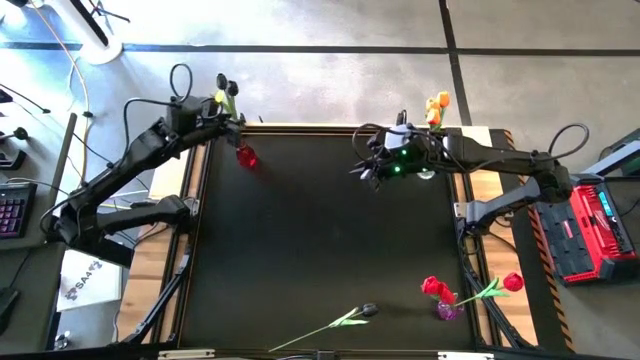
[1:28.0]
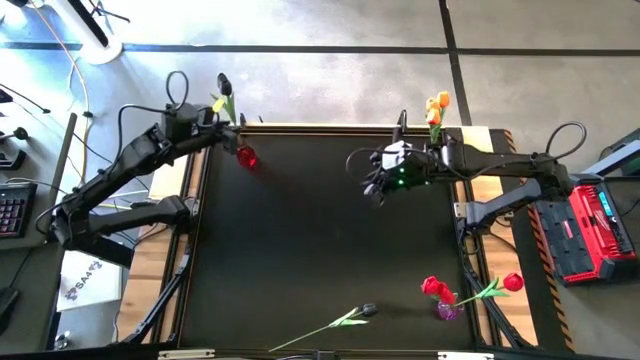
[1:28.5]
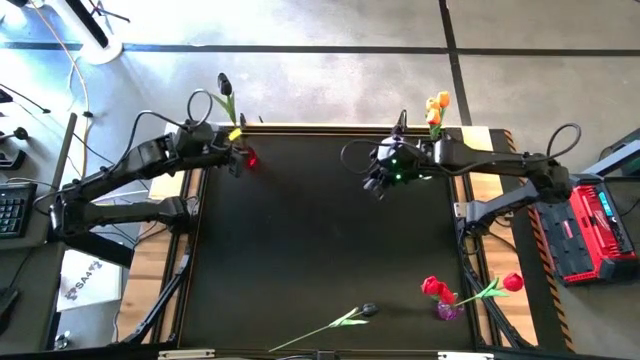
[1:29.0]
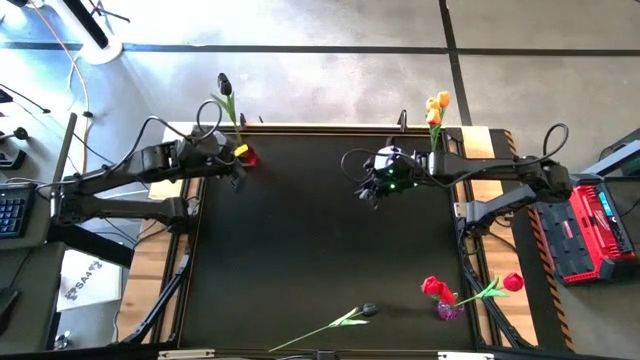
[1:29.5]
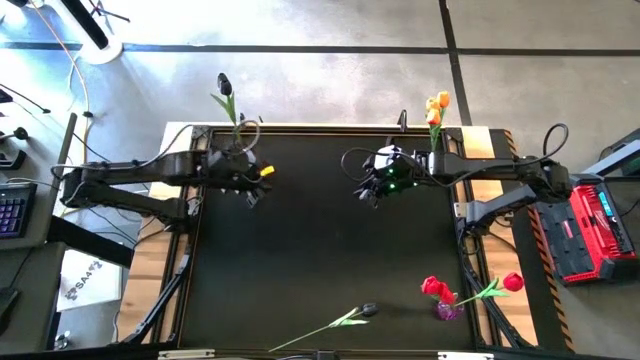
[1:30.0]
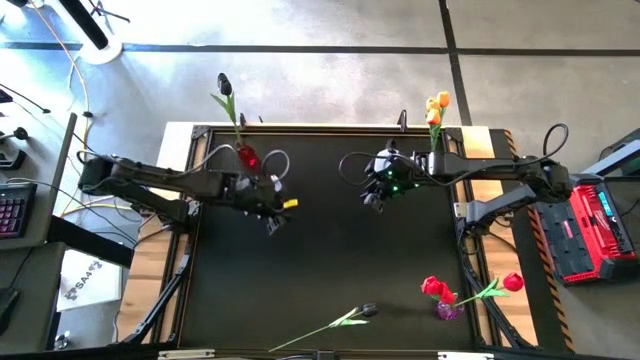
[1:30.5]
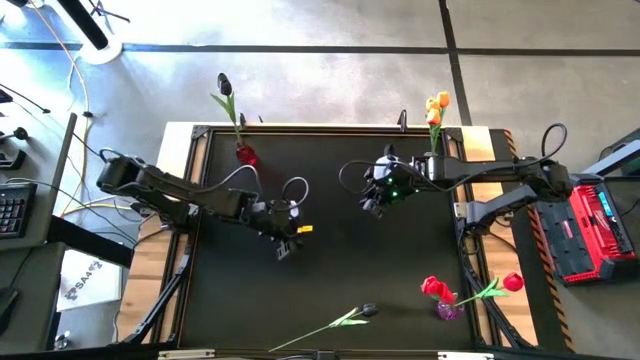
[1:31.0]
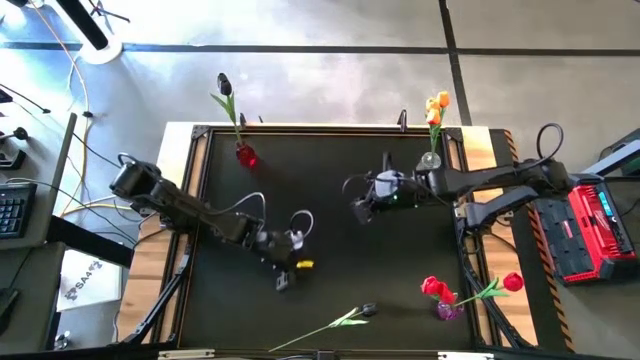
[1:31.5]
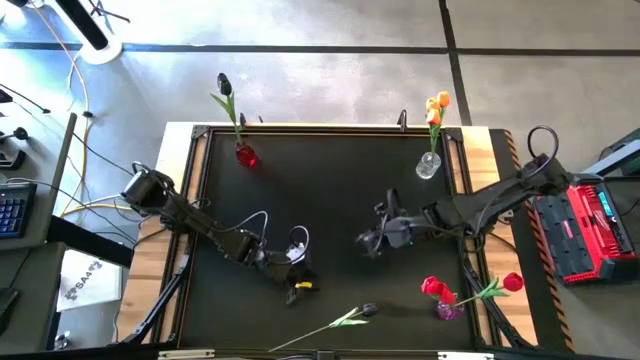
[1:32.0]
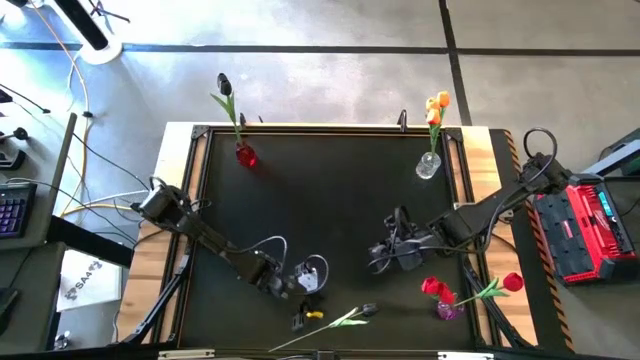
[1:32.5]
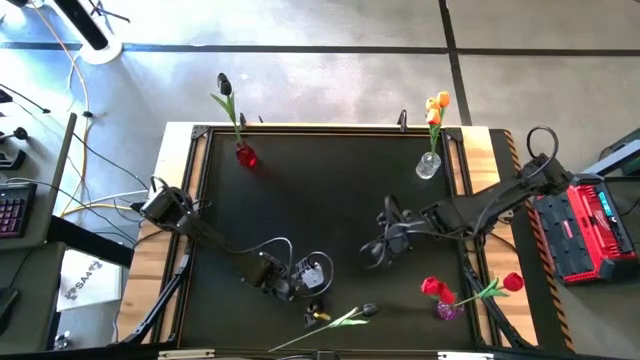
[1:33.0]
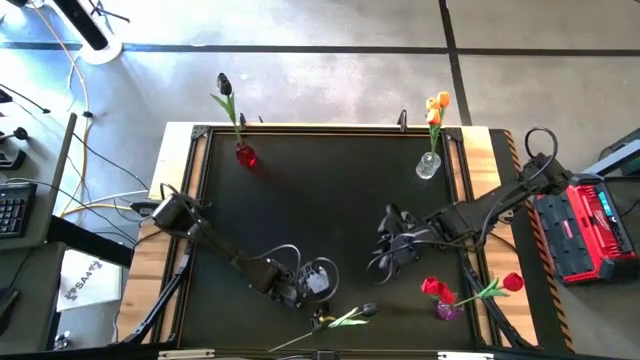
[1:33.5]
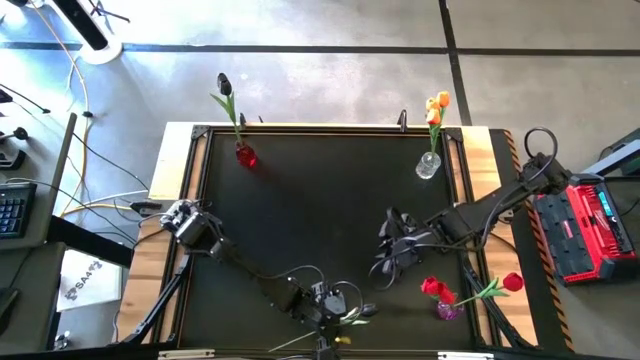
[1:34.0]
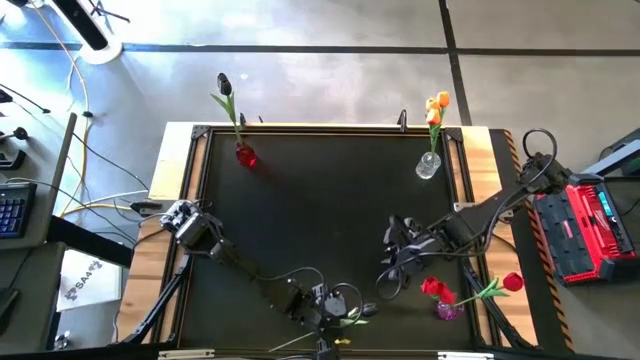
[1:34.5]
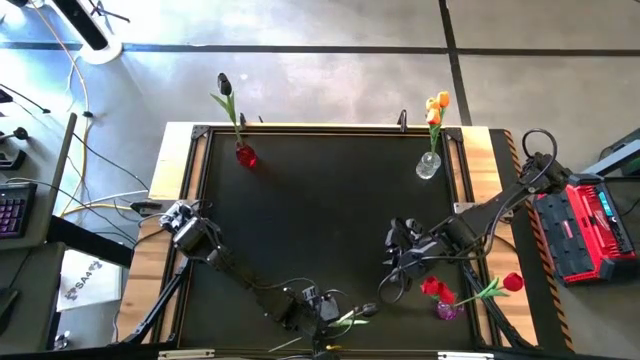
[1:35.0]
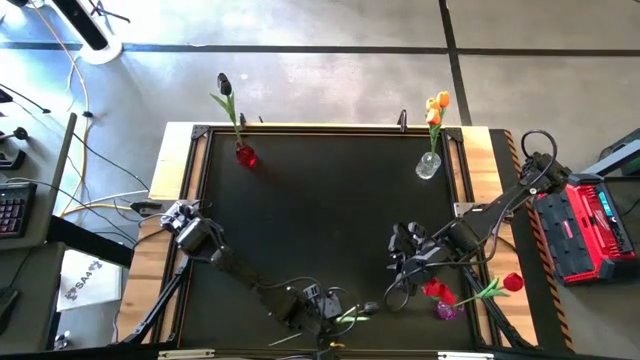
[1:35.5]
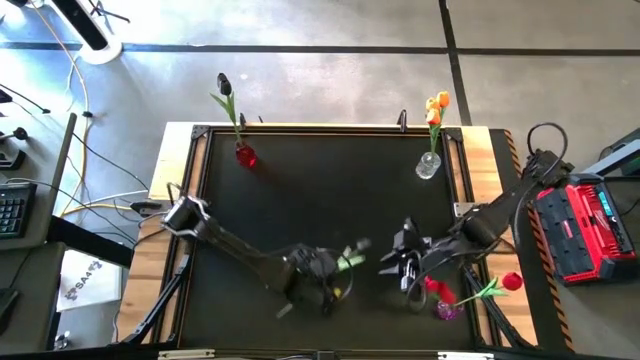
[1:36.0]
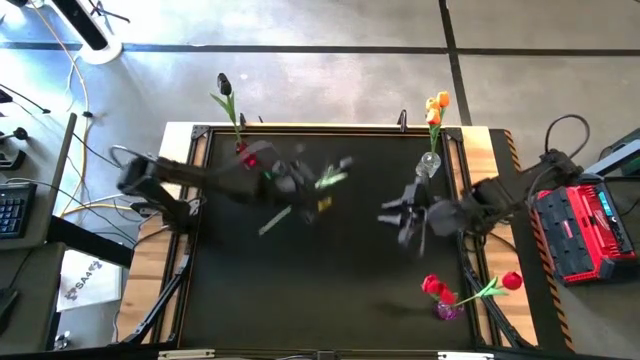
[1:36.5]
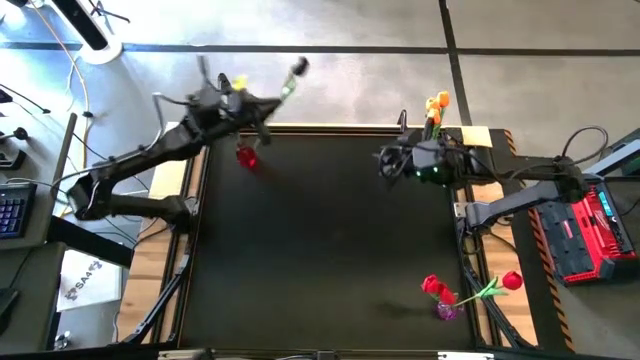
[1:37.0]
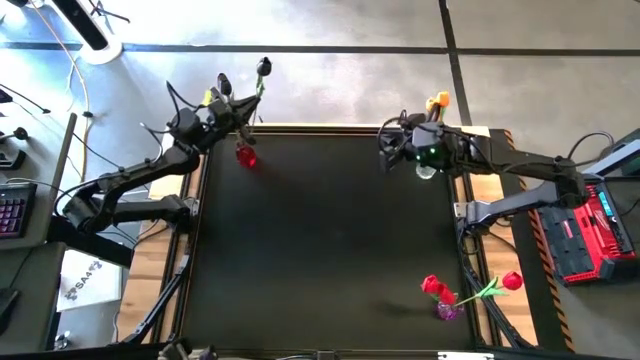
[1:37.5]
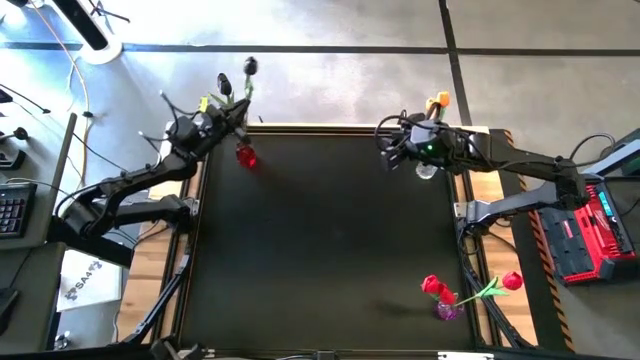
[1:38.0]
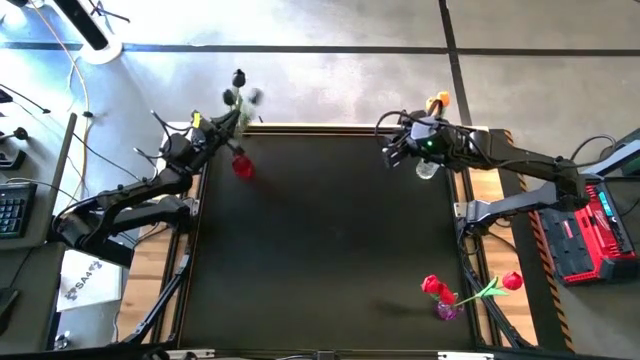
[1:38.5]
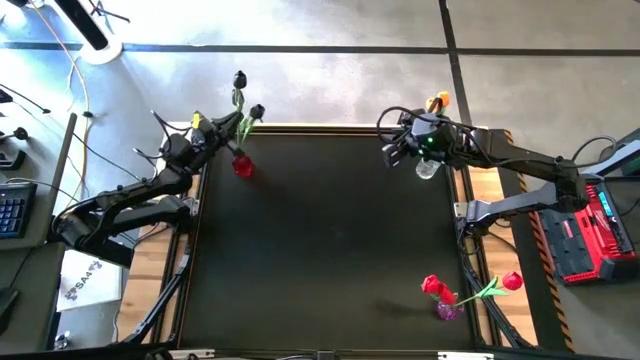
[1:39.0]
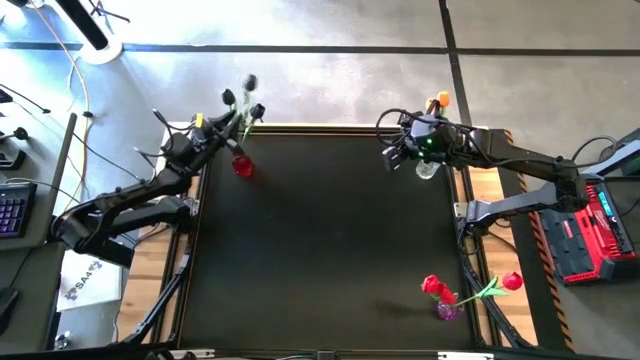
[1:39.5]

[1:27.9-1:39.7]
Task: Sort flowers into vase by color
Put the black tulip into the red vase

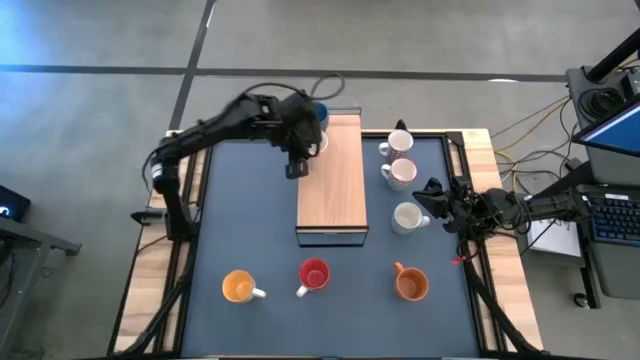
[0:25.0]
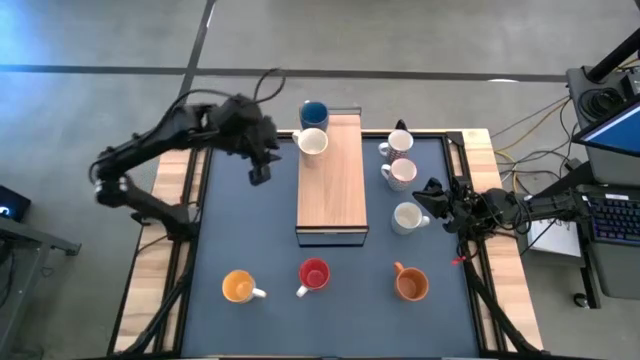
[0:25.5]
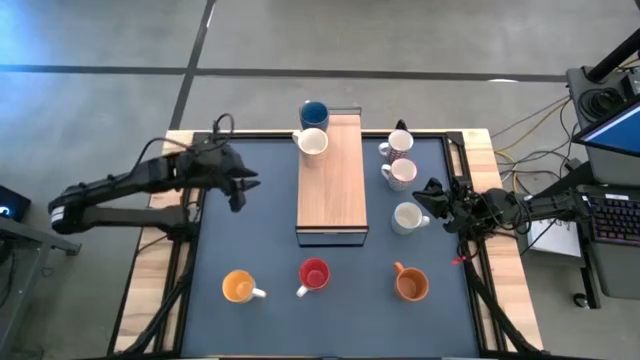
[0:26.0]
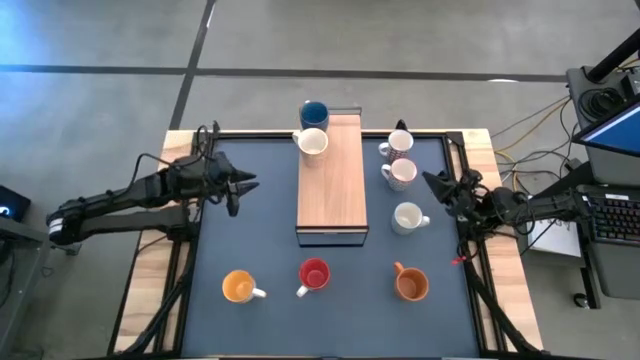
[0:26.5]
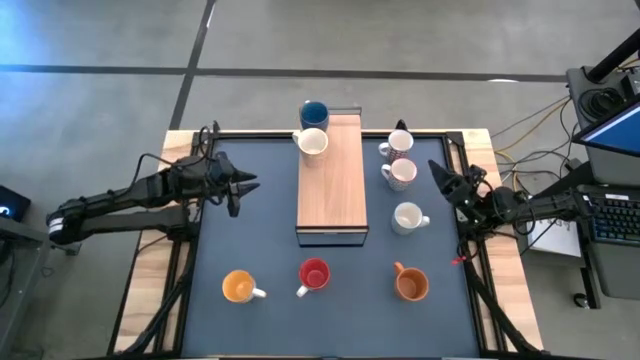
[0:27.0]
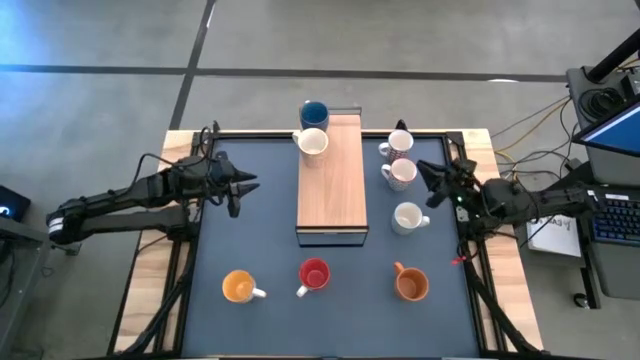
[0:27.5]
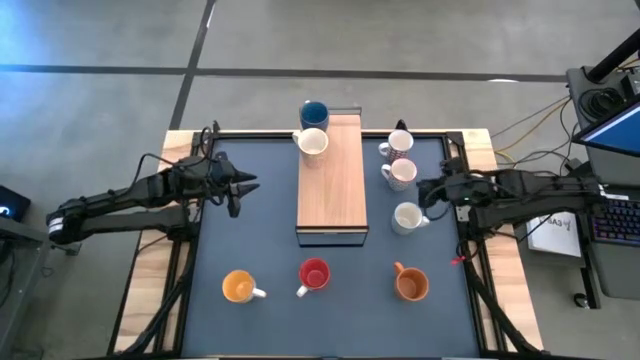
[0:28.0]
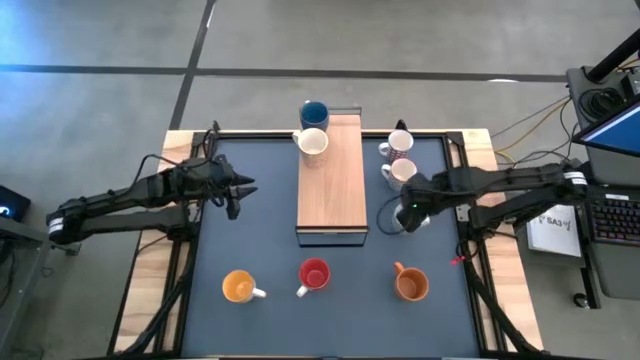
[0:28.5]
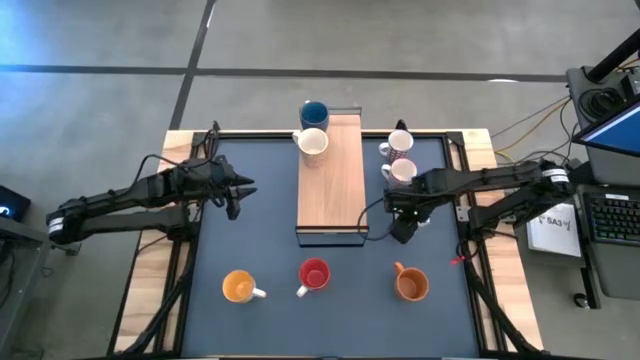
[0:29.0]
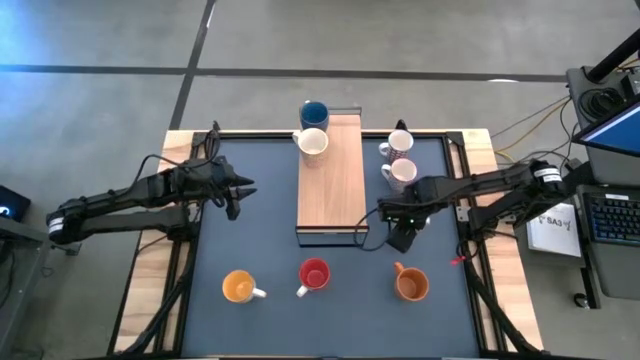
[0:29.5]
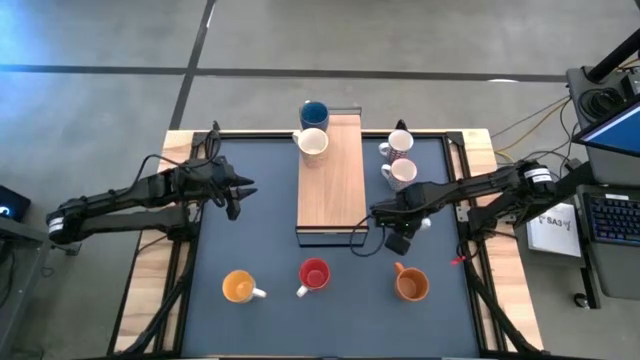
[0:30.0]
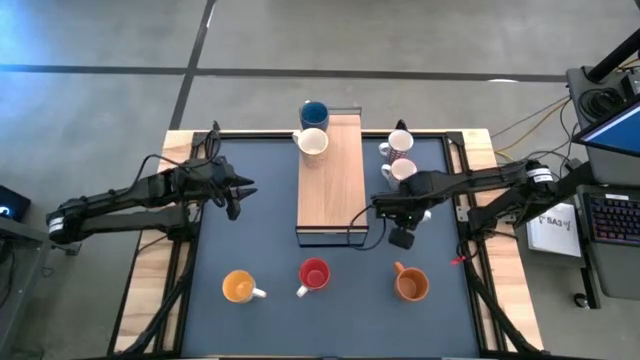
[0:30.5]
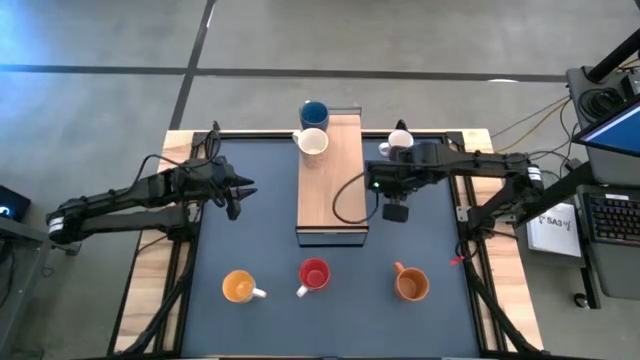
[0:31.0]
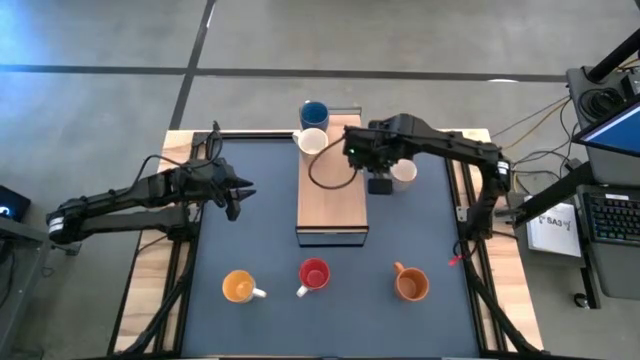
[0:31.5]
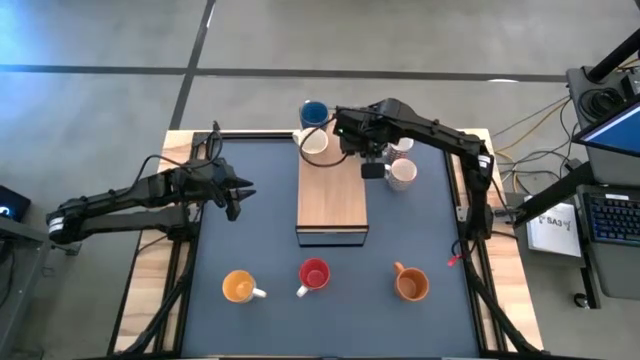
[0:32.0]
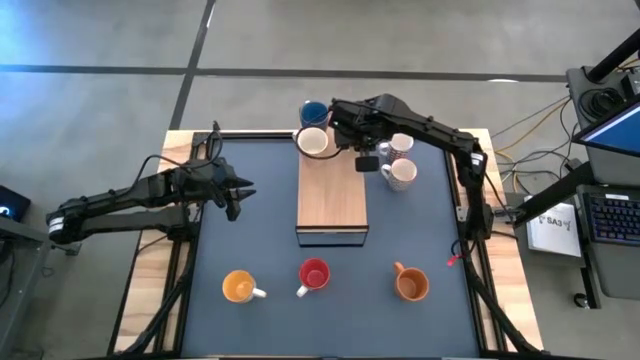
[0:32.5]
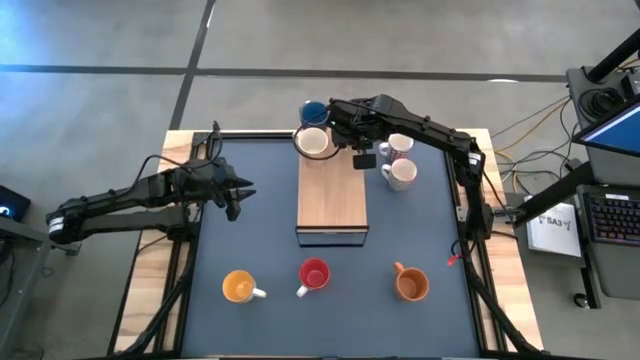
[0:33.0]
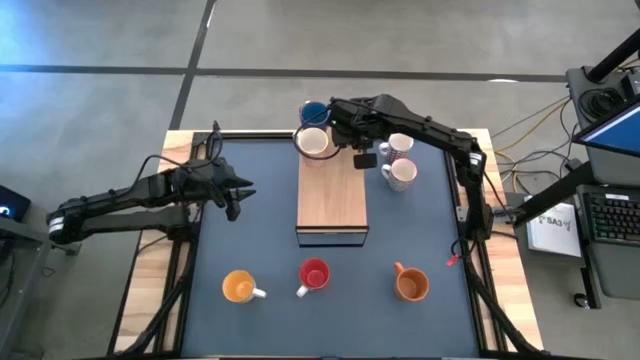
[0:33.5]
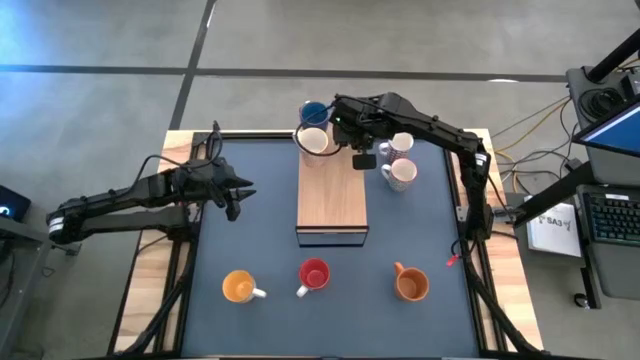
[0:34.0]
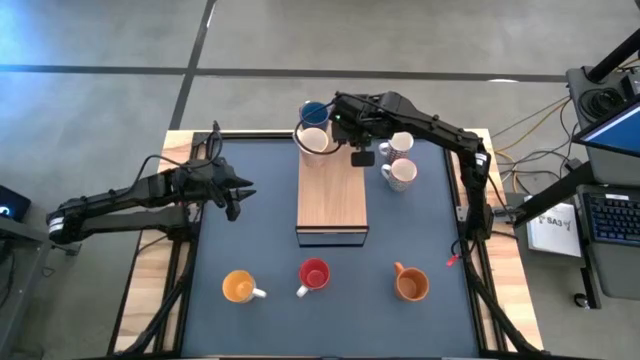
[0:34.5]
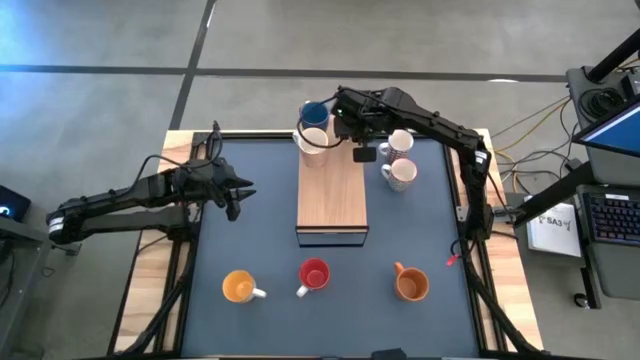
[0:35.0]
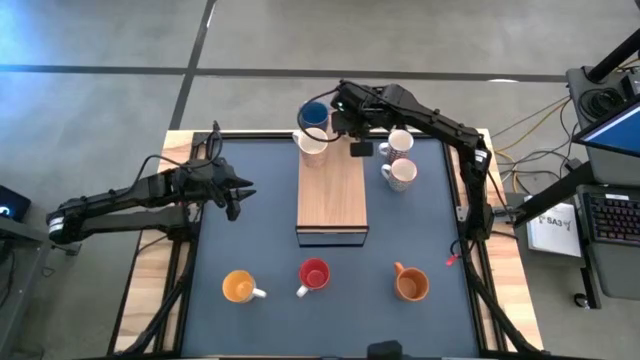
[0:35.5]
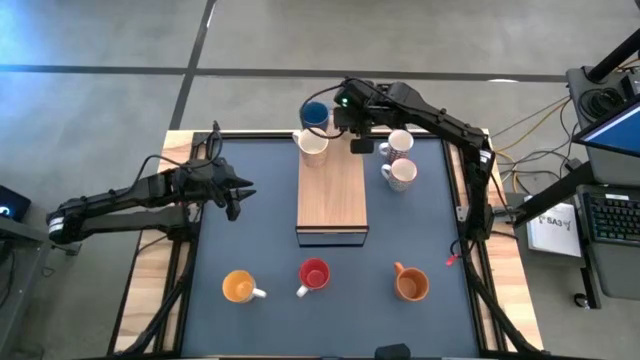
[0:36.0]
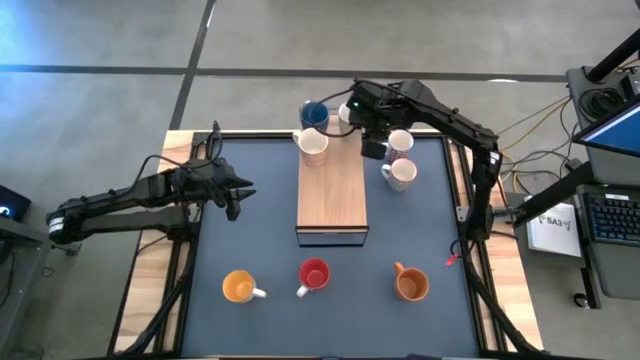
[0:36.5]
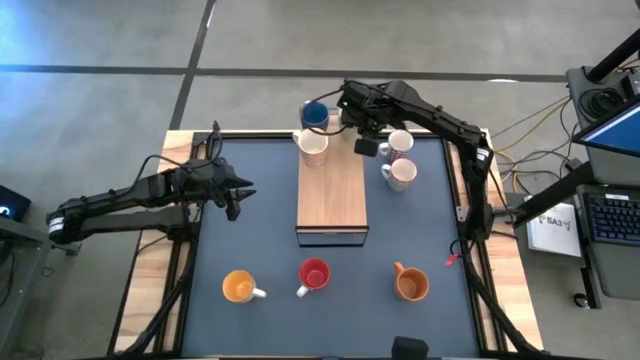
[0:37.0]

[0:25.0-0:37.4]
Task: Place coffee mugs
Put the blue patterned mug on the shelf
